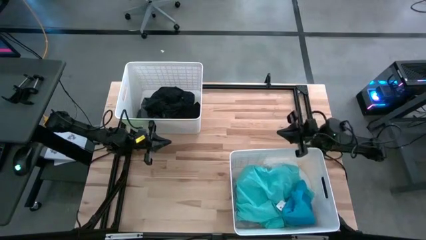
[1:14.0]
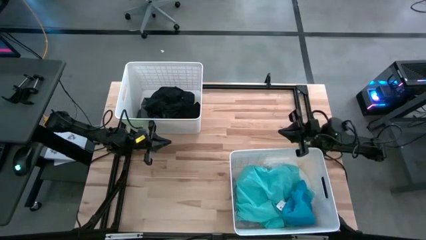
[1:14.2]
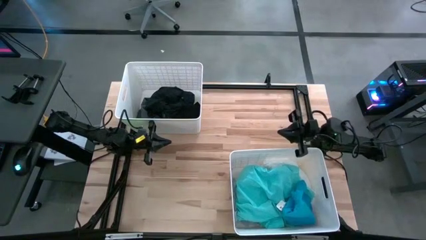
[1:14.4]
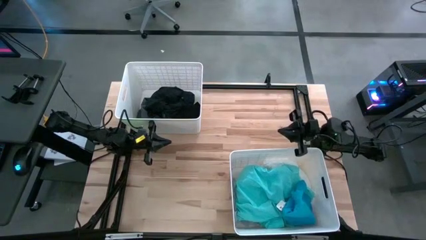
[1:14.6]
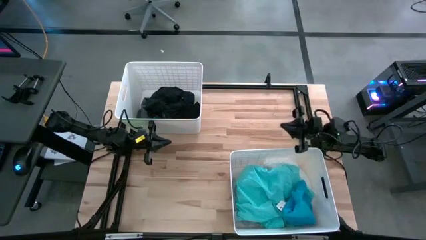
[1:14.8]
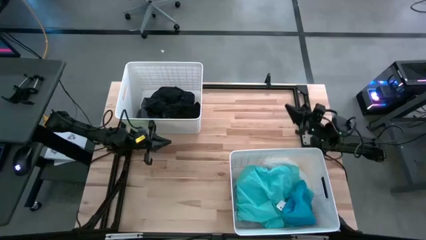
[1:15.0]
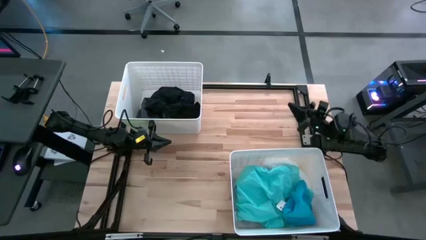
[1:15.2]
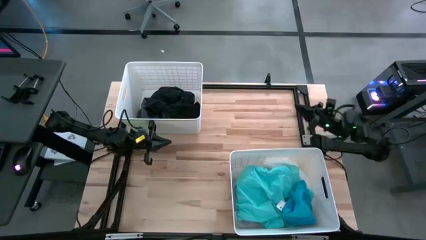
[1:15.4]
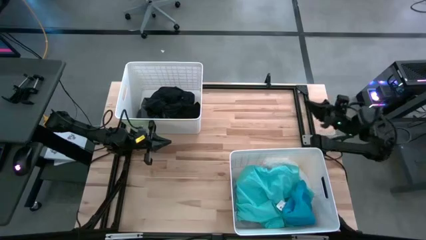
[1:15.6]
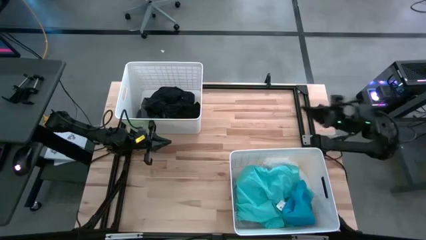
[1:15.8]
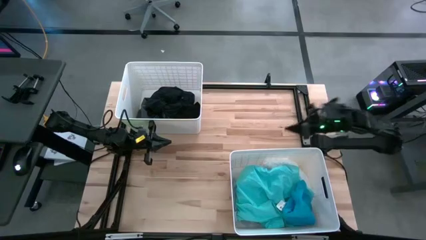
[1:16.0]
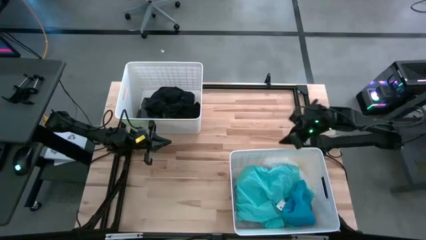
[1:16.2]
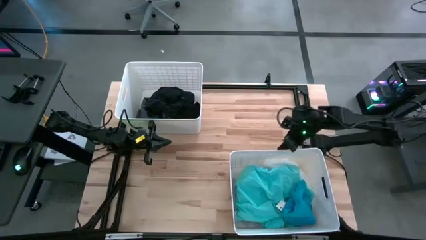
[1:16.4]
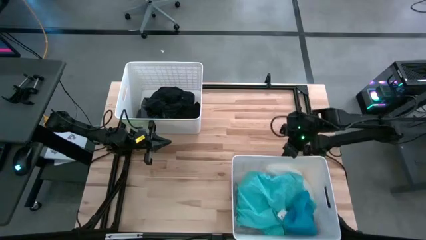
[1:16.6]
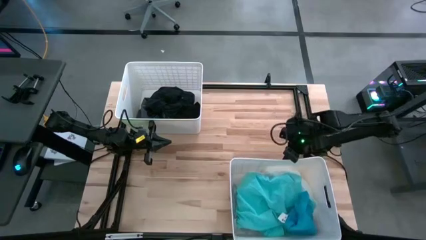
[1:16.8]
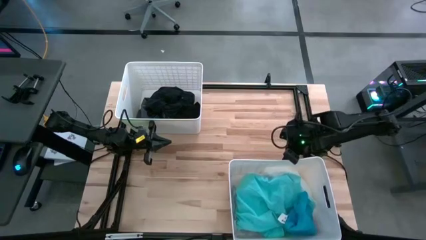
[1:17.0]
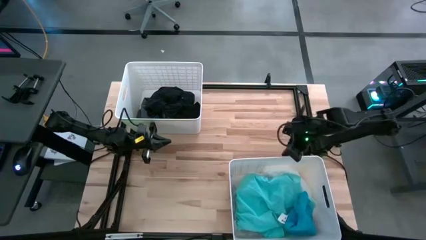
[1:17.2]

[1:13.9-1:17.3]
Task: Sort clothes
Adjust the bottom white bin

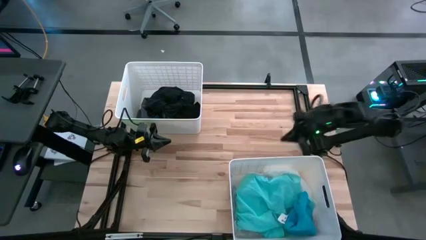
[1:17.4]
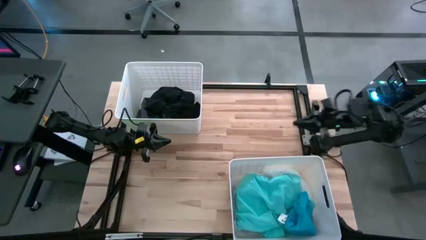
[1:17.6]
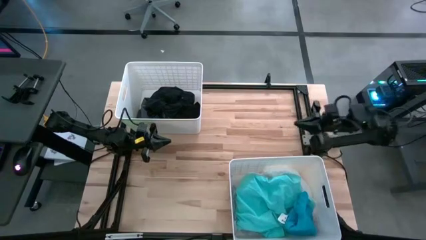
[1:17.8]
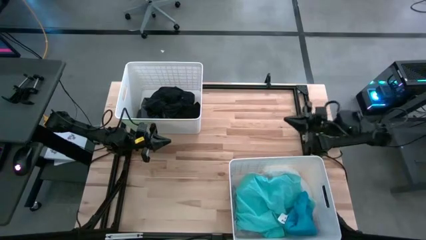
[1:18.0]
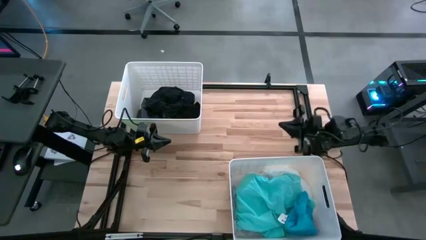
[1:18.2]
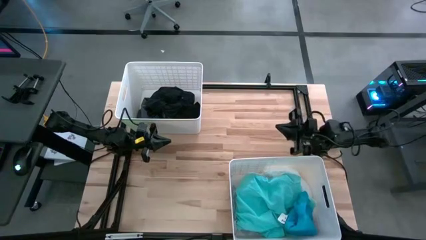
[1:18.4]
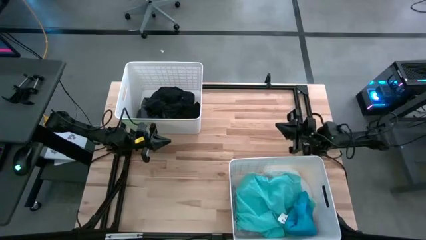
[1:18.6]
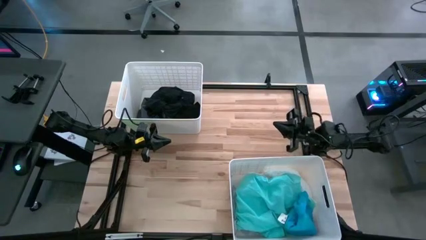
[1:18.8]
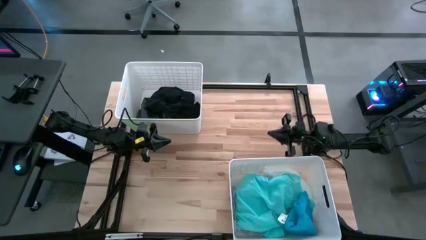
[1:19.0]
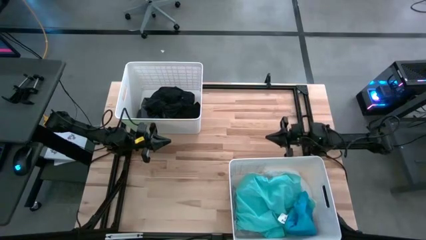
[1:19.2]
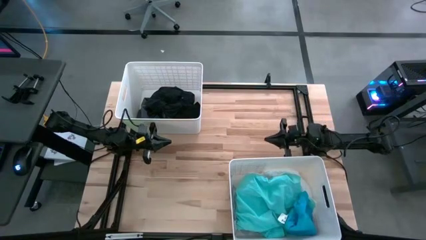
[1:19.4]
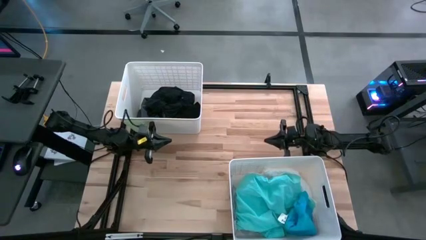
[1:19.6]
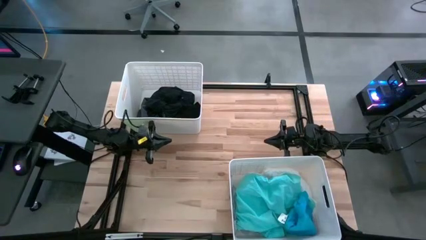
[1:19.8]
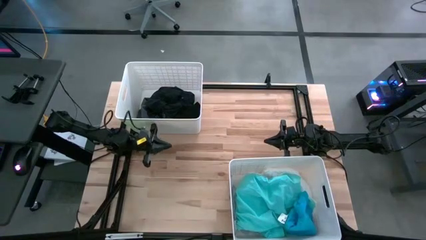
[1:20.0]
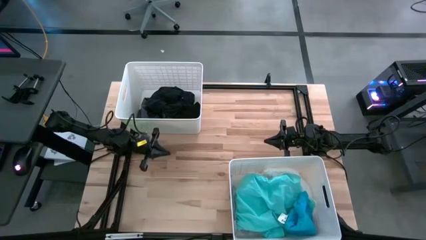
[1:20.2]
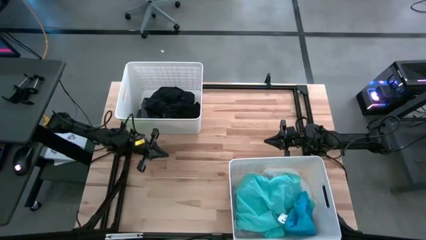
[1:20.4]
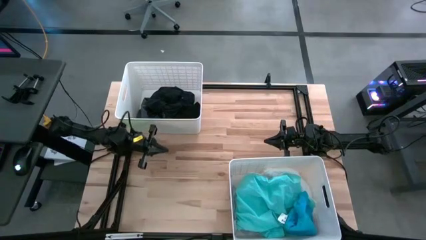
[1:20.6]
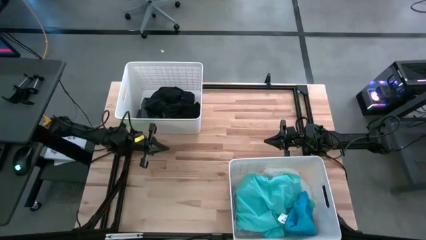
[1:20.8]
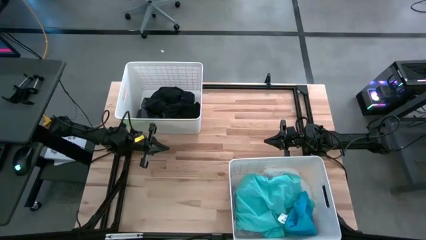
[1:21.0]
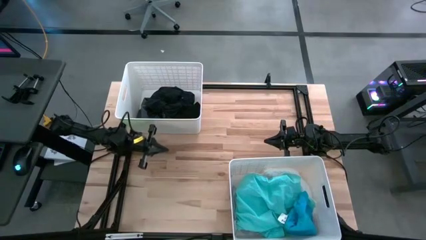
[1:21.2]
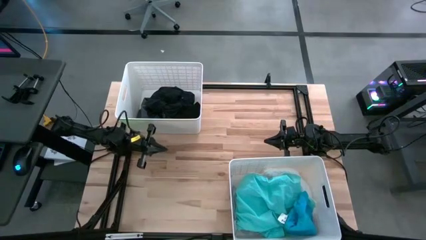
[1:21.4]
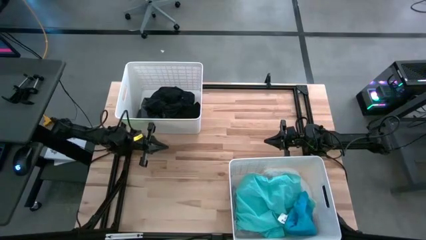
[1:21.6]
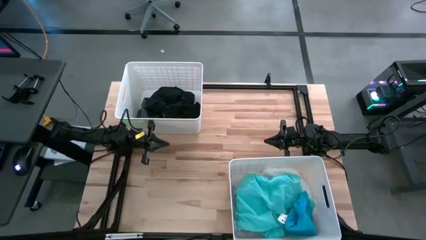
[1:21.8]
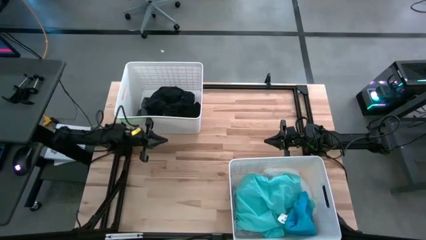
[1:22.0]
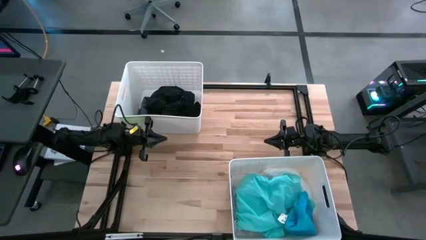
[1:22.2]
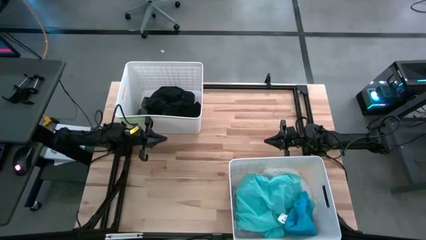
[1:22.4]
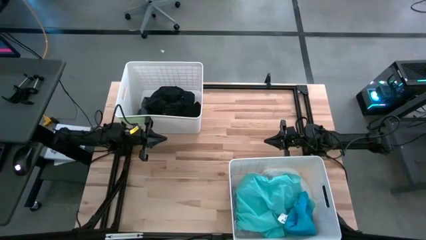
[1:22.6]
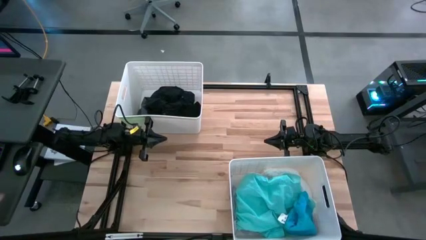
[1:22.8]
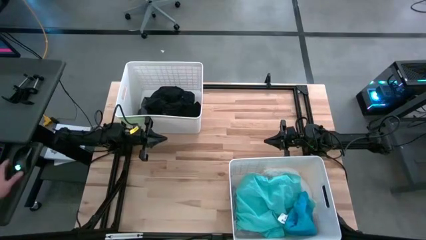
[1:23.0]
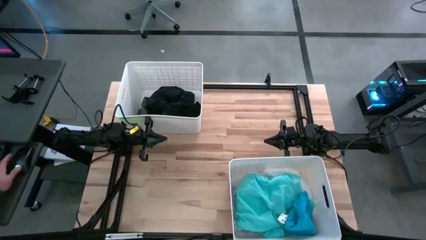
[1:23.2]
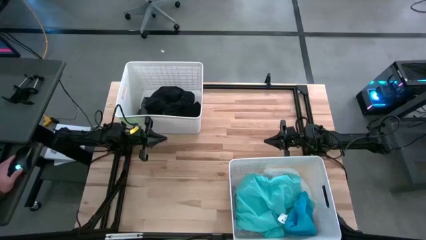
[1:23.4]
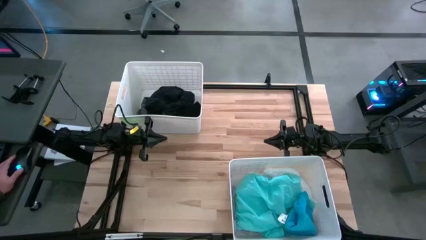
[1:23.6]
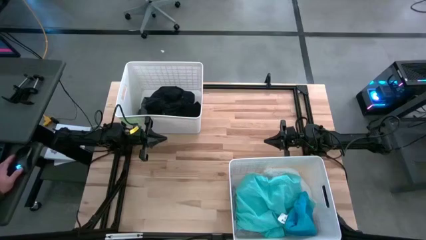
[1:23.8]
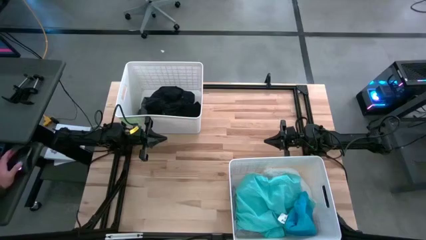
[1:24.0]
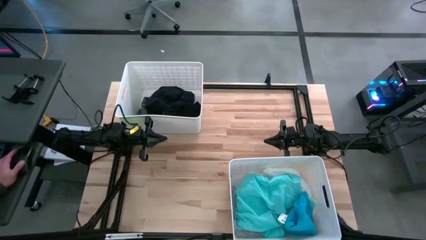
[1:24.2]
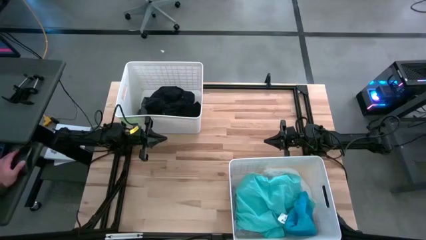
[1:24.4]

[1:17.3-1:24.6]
Return to Home Position

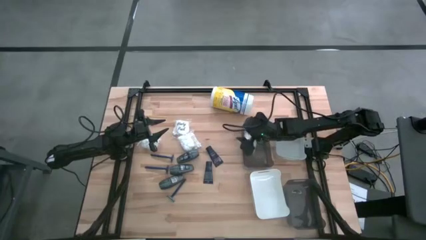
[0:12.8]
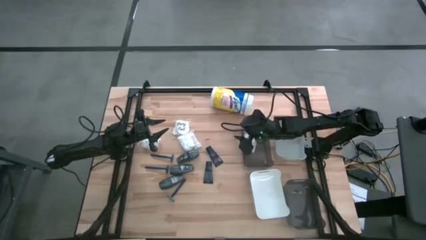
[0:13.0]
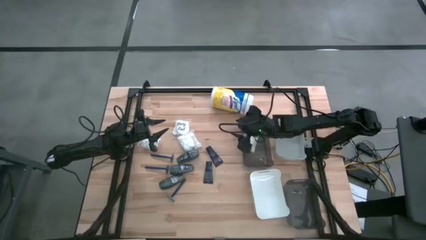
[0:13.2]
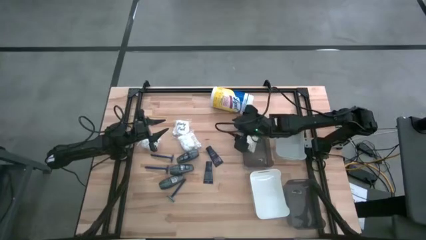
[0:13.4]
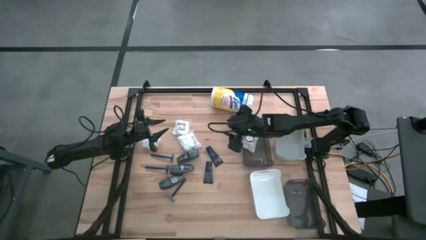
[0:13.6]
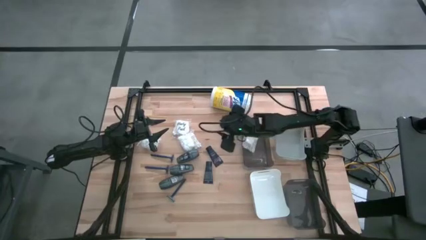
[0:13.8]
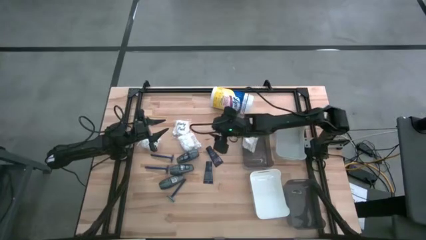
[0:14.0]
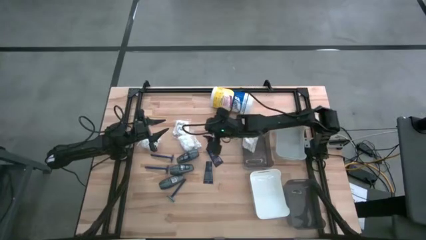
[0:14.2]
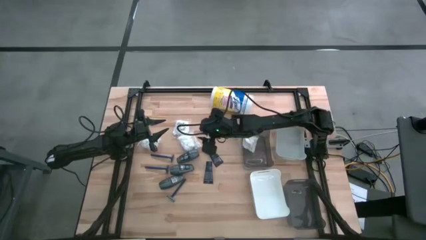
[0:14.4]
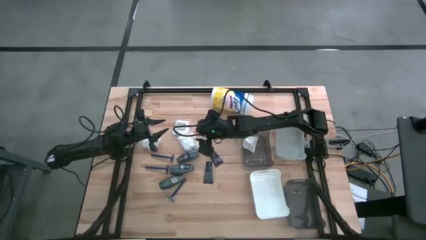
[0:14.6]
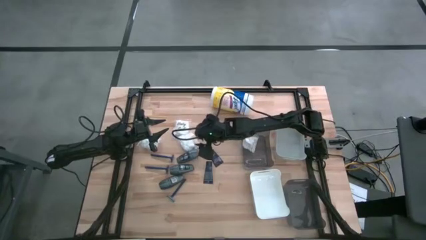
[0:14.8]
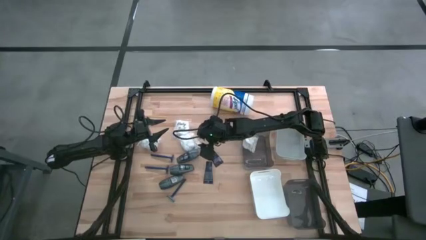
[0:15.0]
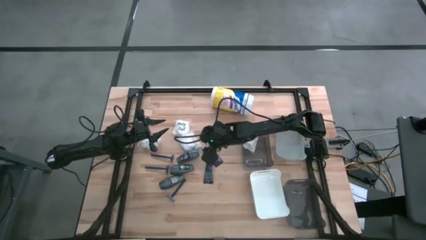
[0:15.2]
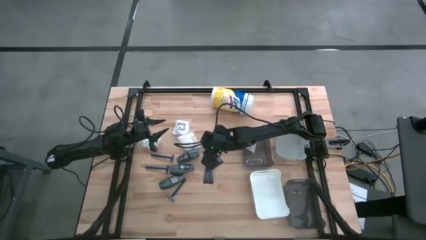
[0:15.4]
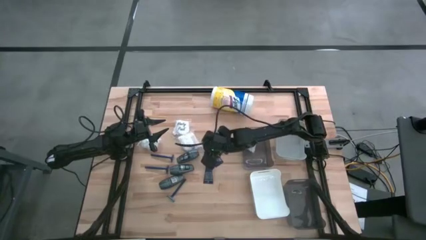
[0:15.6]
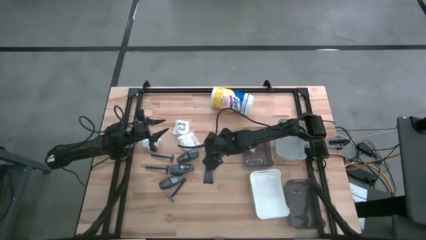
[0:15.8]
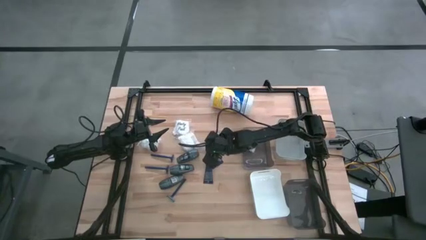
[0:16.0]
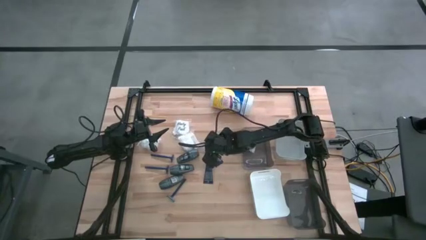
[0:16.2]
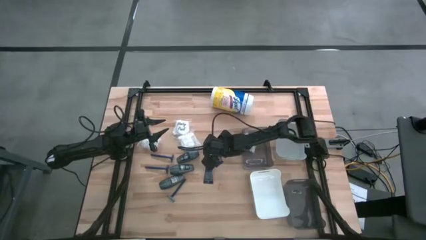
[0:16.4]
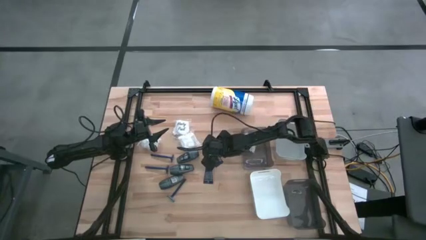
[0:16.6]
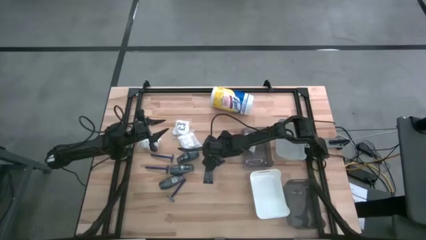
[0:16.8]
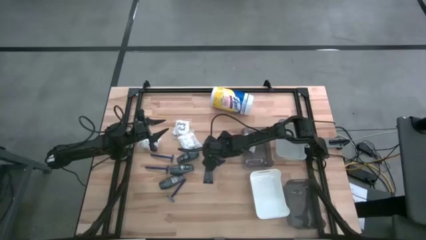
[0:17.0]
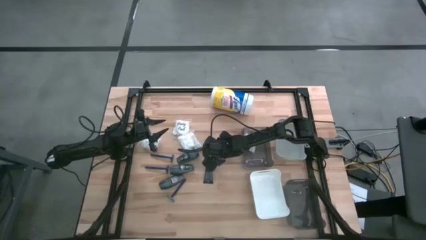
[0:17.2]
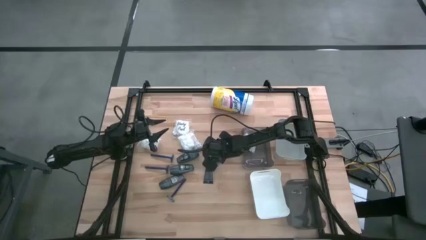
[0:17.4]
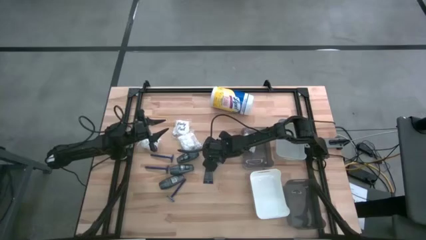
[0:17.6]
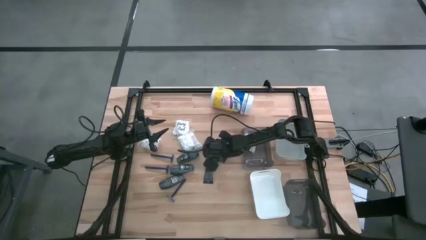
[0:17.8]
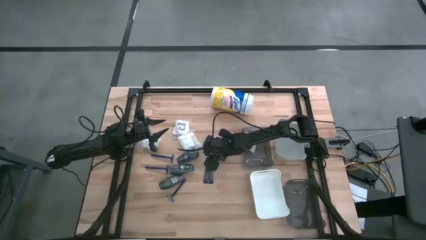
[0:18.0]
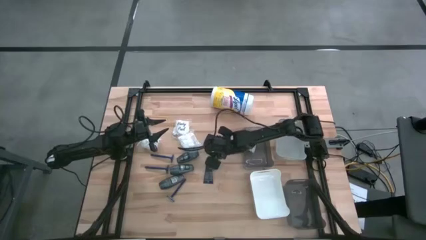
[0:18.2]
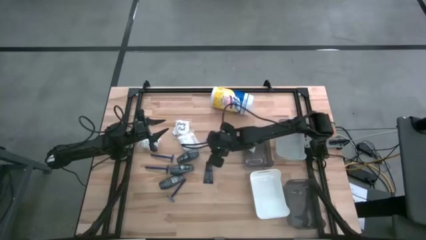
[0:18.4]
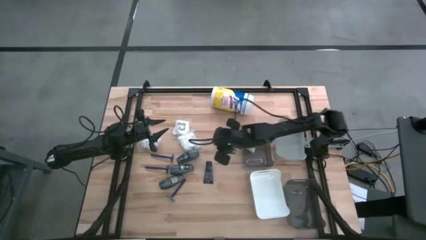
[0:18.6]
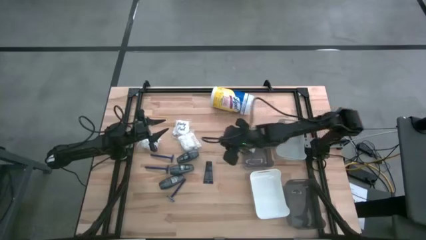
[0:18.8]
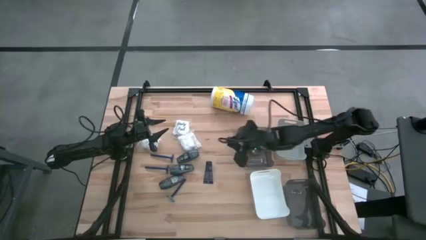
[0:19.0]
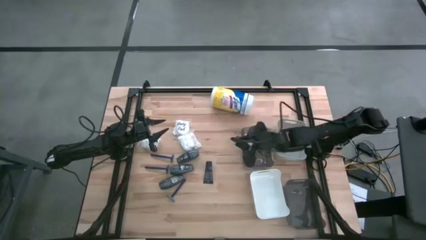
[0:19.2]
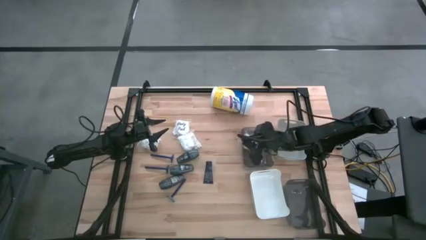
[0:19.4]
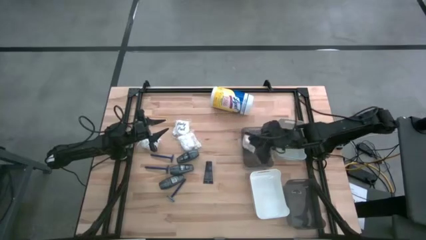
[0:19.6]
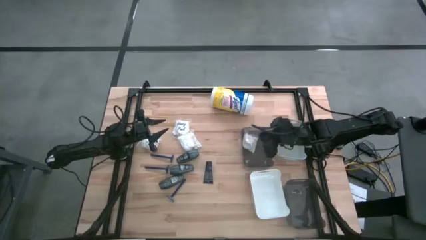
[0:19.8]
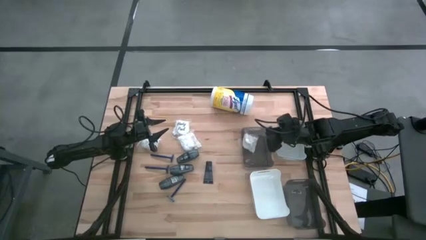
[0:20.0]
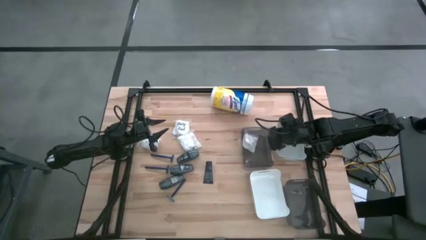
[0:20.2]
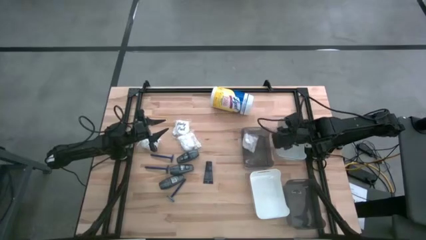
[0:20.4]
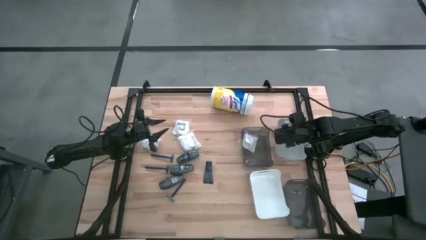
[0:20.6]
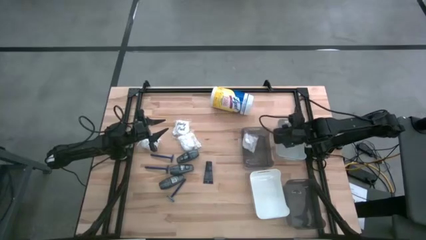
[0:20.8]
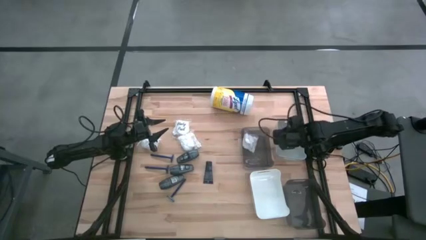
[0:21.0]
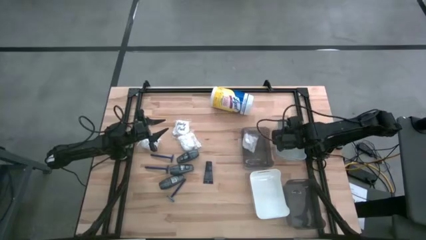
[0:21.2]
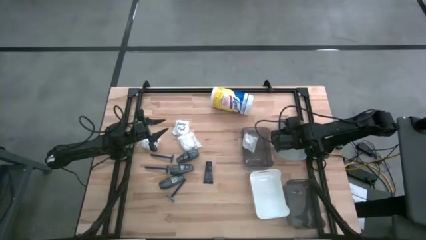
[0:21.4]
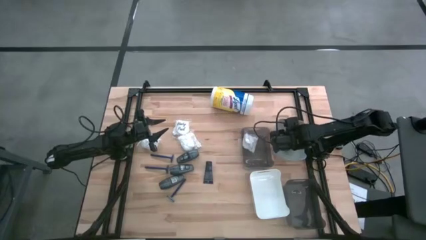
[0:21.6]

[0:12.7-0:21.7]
Task: Pick & Place Travel size toiletries
Put the top shave cream into the gray bin
